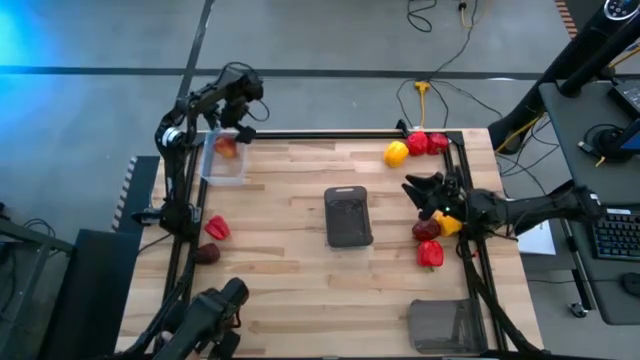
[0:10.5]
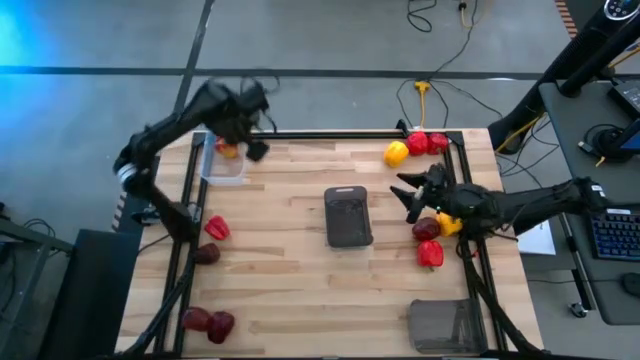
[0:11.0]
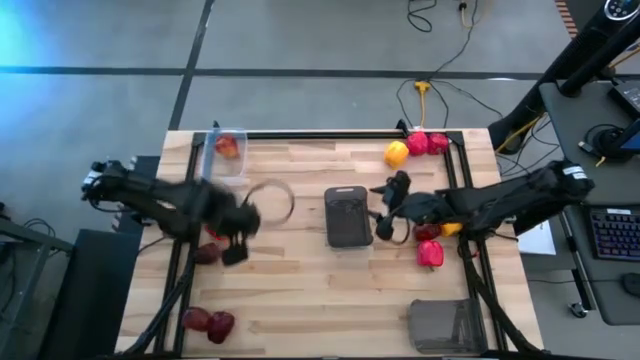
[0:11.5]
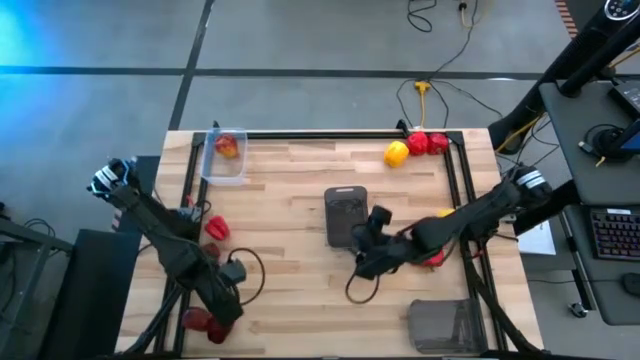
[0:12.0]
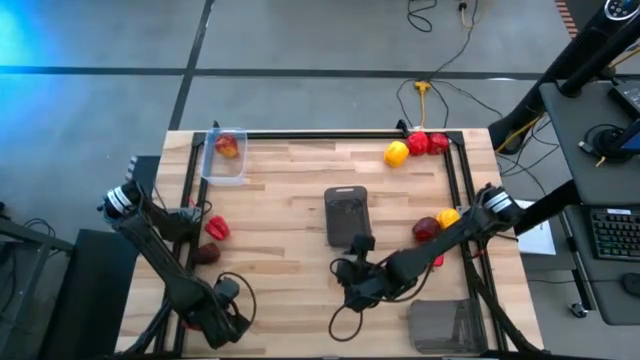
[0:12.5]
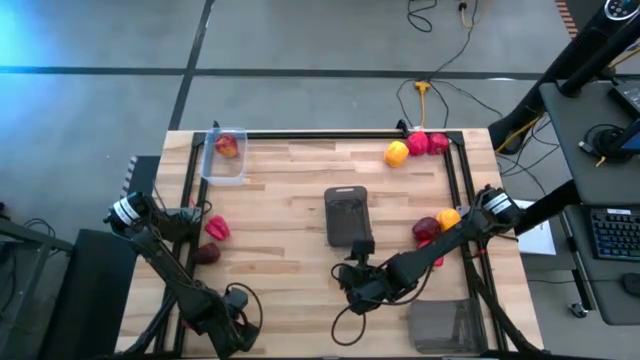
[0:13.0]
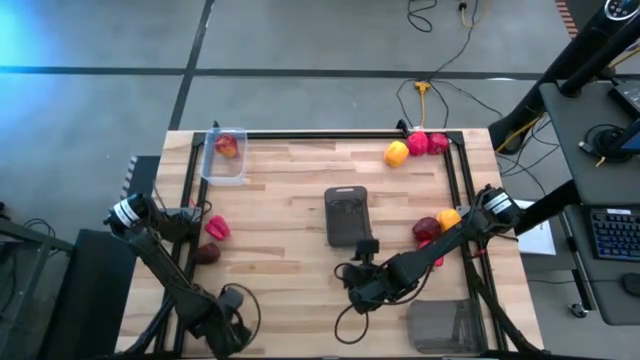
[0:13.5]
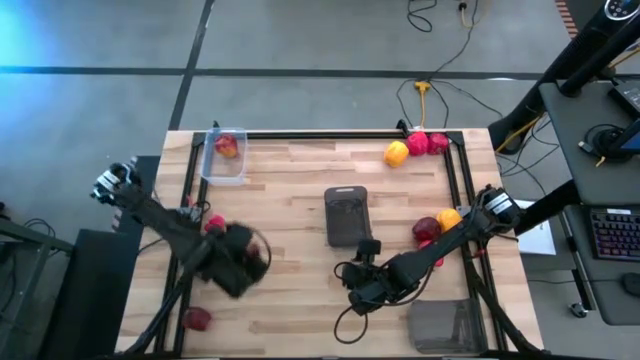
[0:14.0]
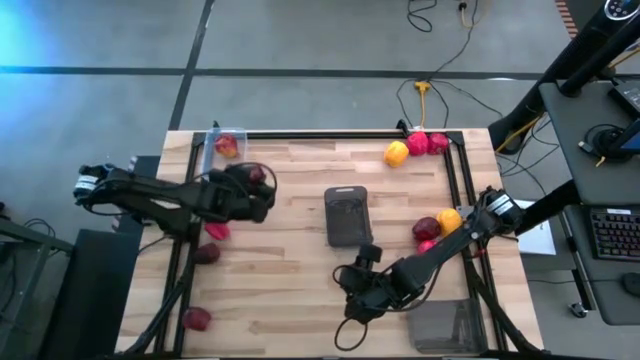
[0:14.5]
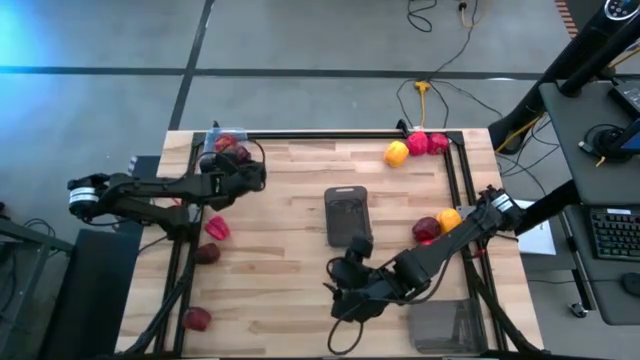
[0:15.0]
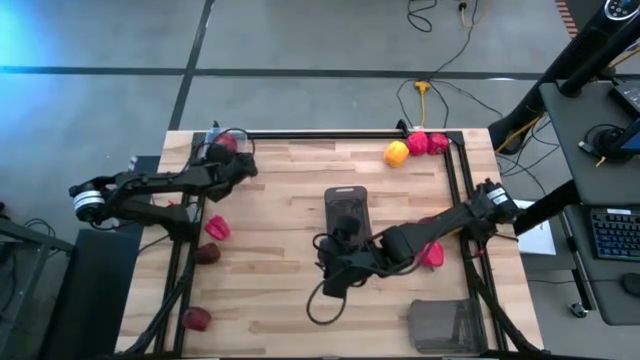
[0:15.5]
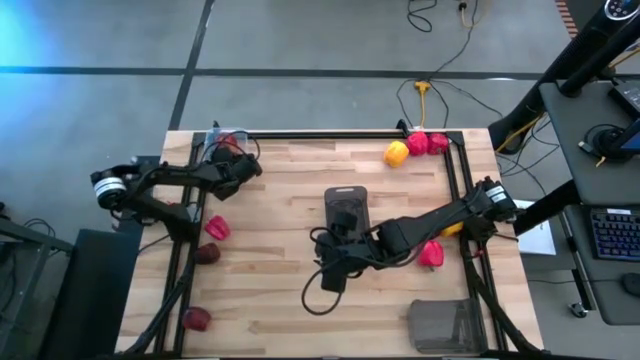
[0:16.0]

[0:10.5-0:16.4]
Task: Sort produce into baskets
Put the red apple into the transparent bin

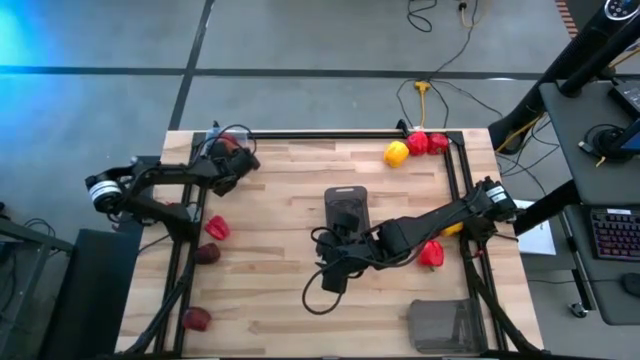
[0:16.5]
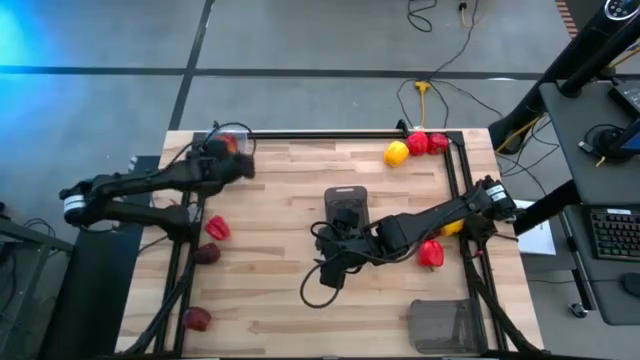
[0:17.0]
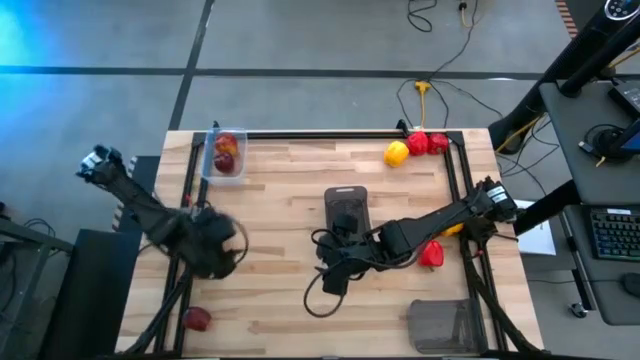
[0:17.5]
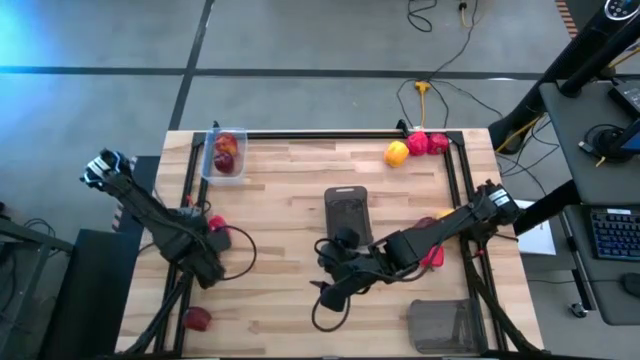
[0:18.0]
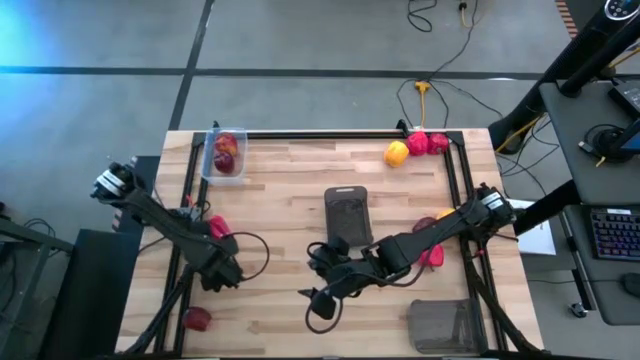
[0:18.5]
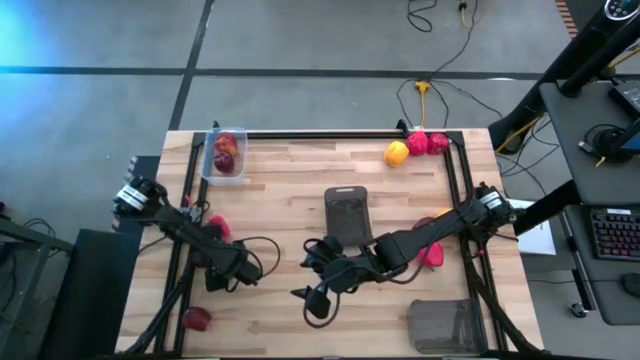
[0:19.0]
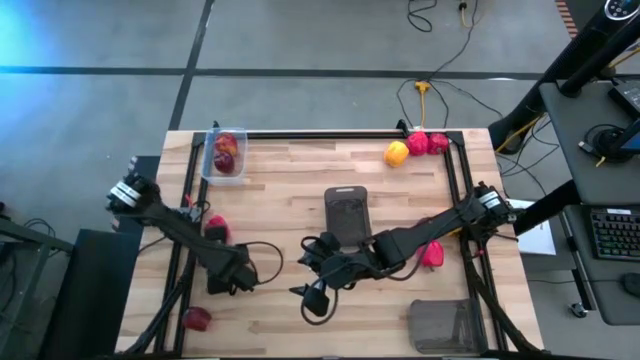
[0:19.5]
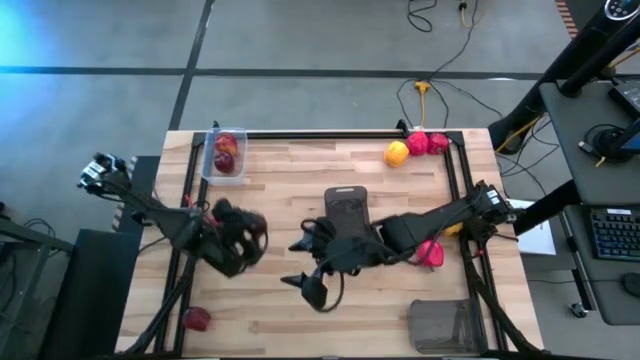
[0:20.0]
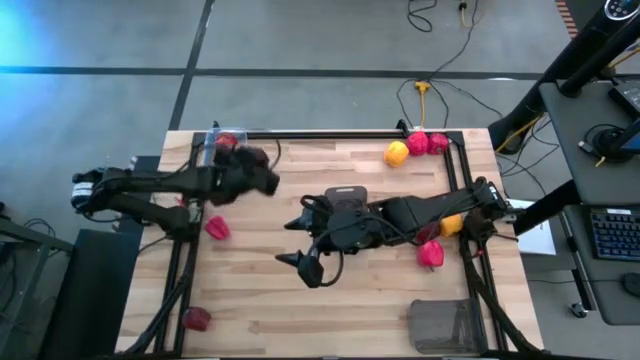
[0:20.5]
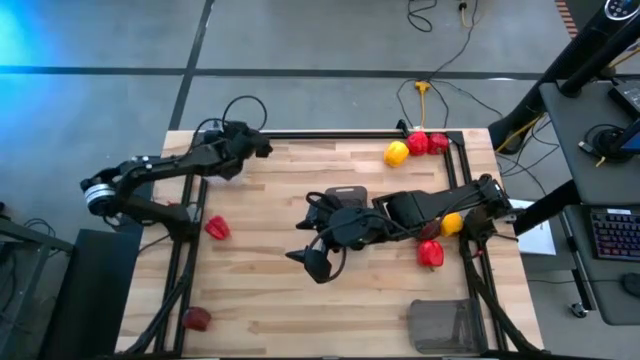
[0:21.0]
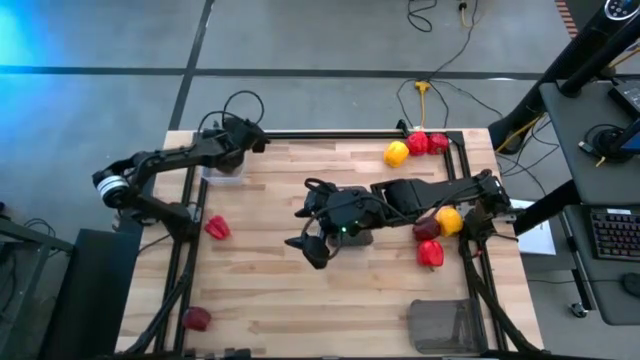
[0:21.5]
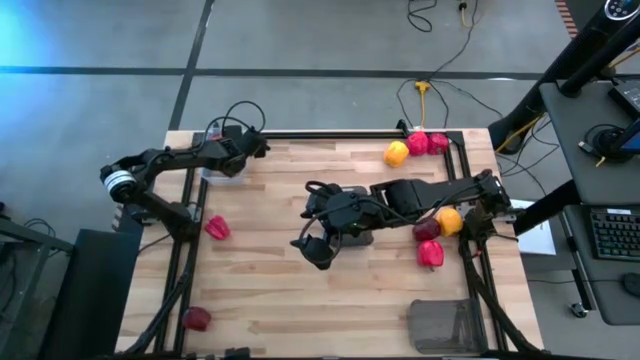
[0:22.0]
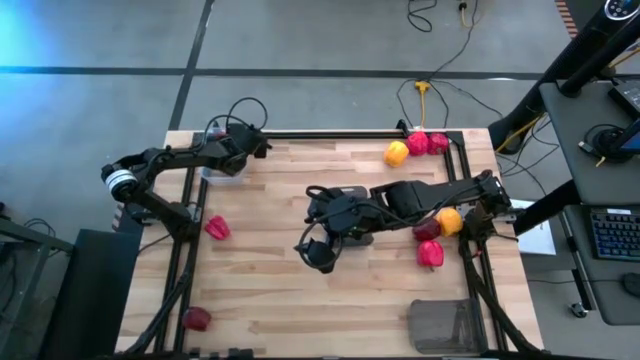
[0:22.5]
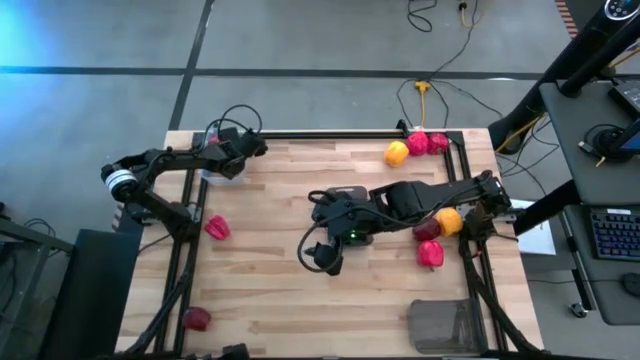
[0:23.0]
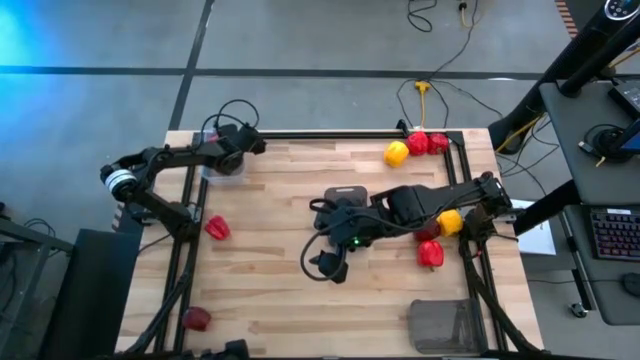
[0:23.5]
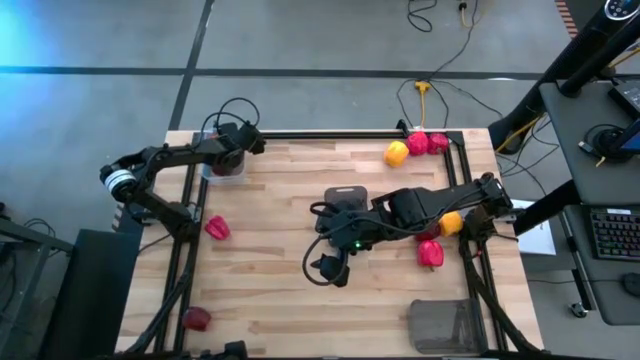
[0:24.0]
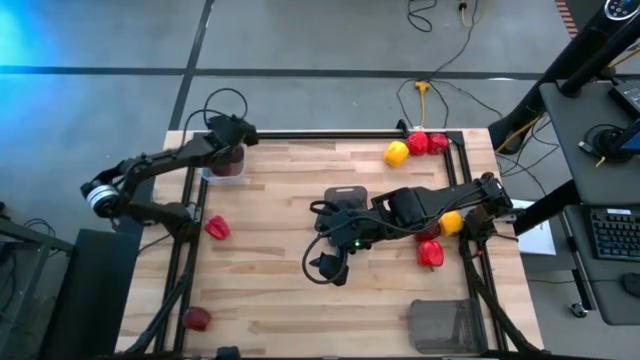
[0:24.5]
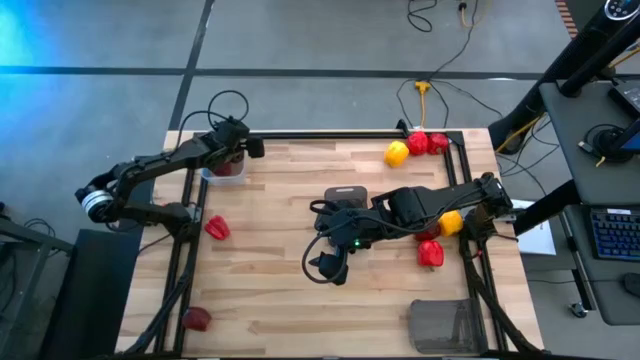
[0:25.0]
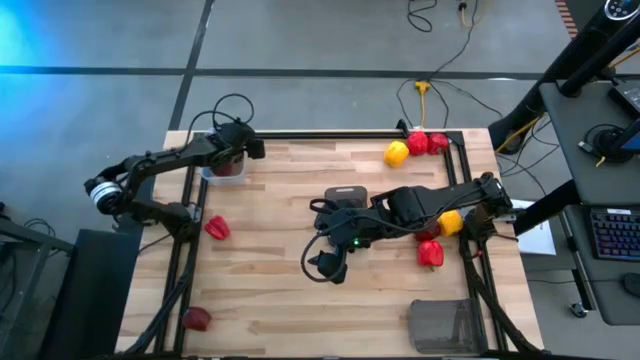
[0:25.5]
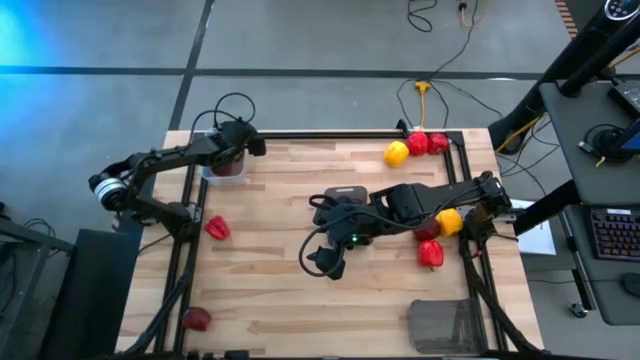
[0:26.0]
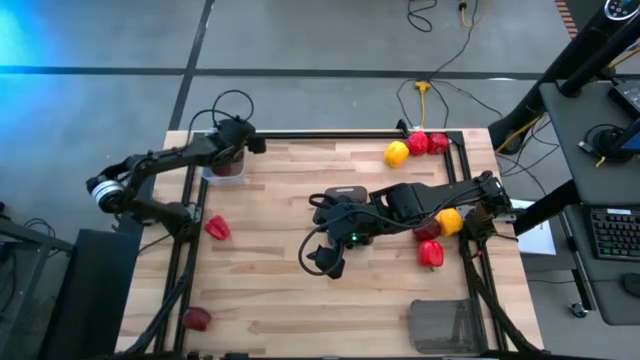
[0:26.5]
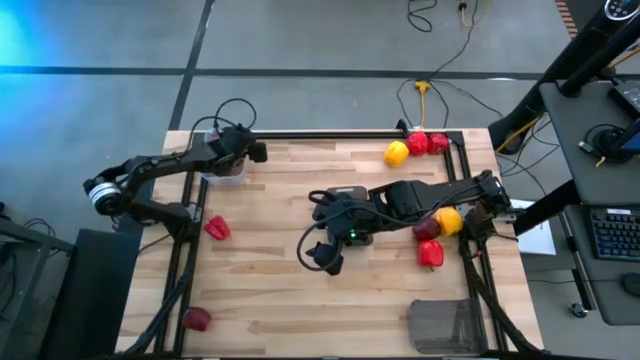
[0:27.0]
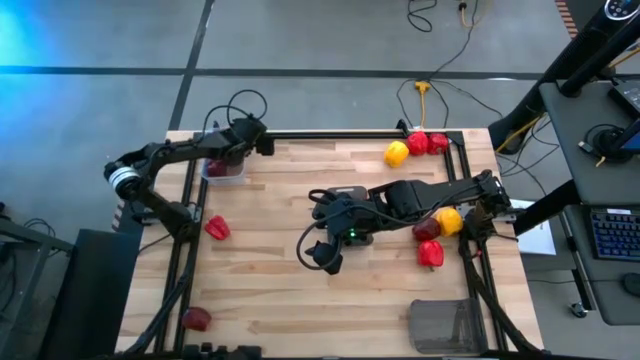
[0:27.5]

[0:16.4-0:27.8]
Put the red apple into the transparent bin

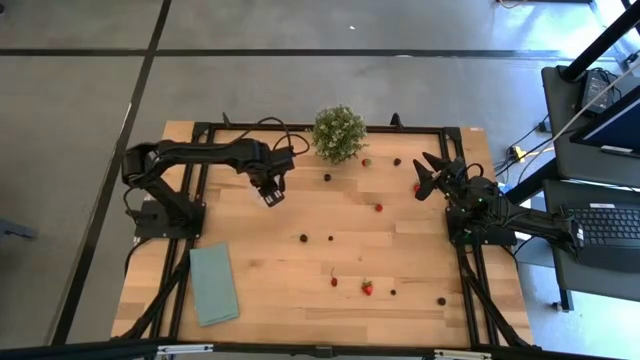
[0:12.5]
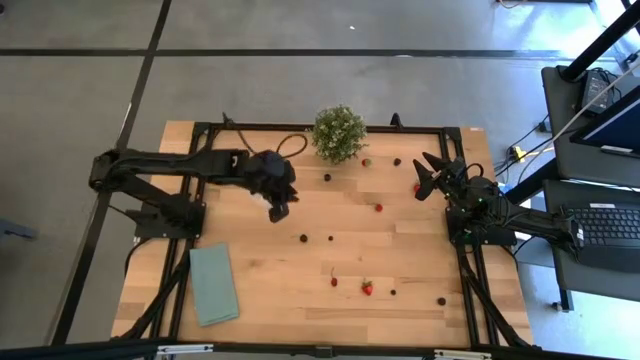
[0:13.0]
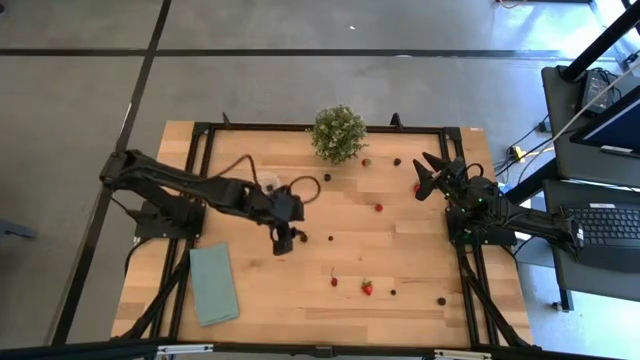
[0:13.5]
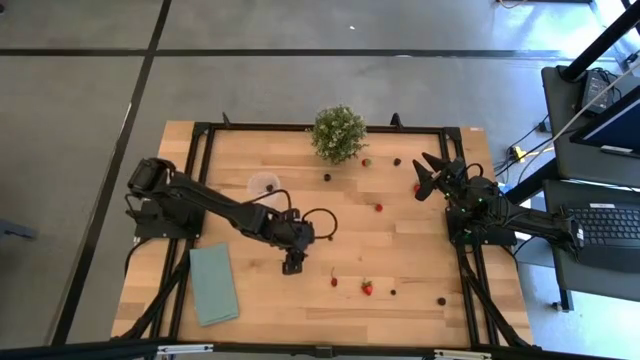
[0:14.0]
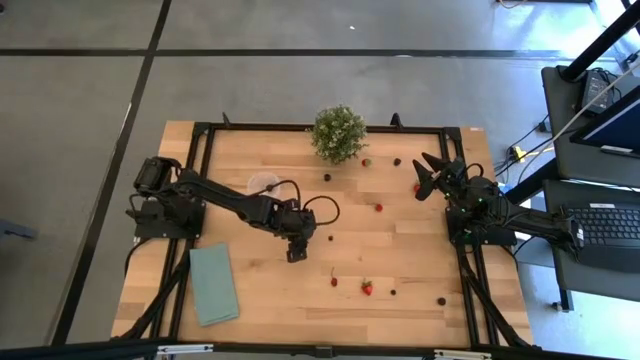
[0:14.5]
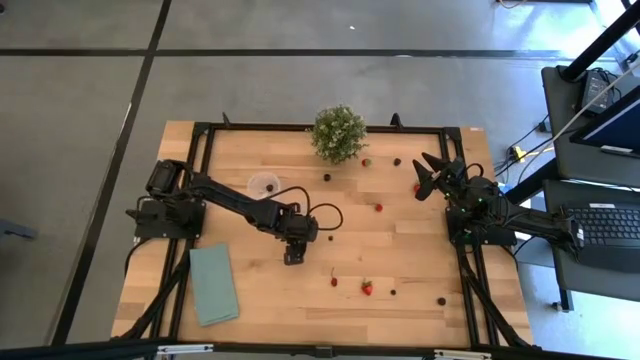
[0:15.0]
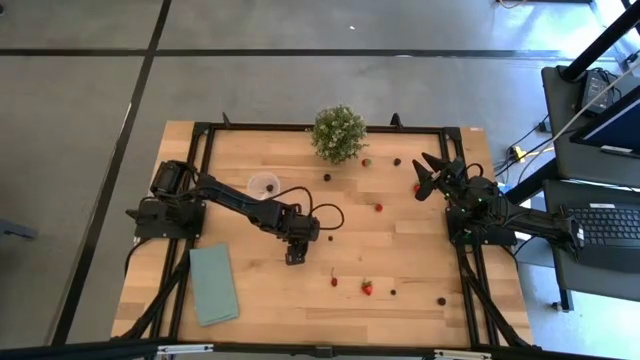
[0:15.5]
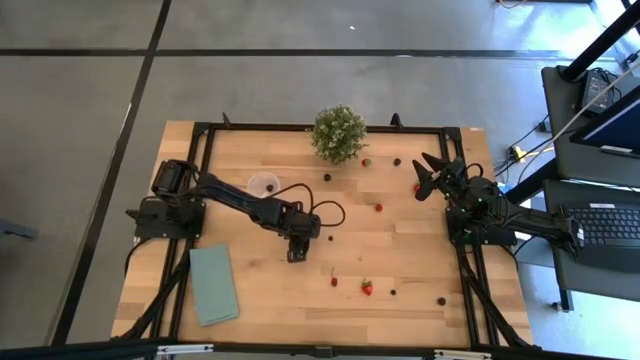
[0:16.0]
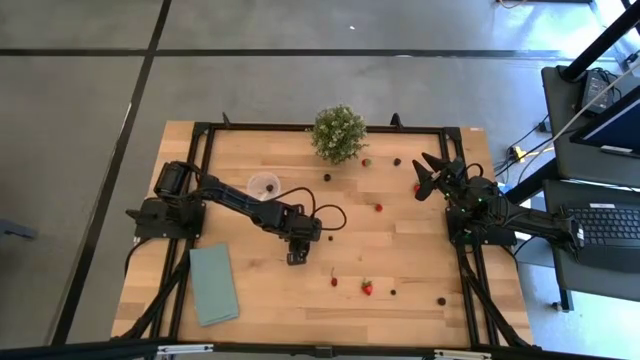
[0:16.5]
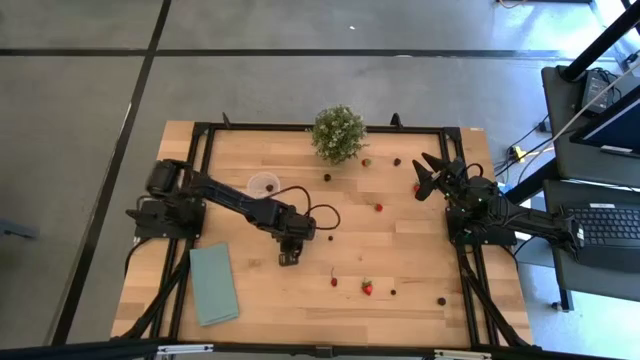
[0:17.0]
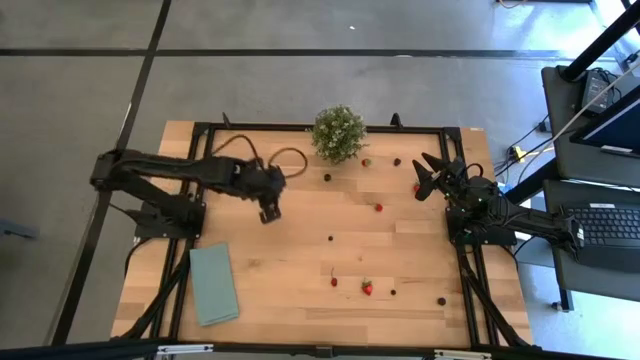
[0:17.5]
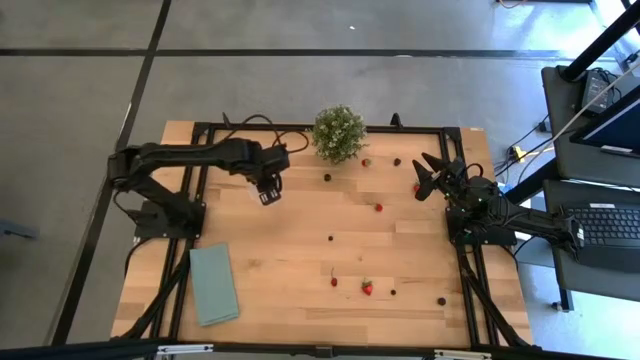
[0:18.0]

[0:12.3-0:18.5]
Task: Pick and placing Produce into tupperware
Put the black cherry into the transparent container
